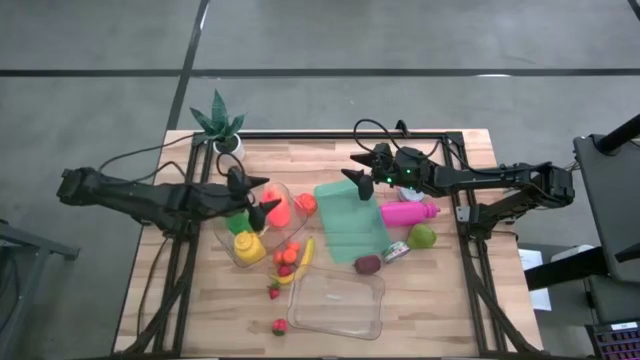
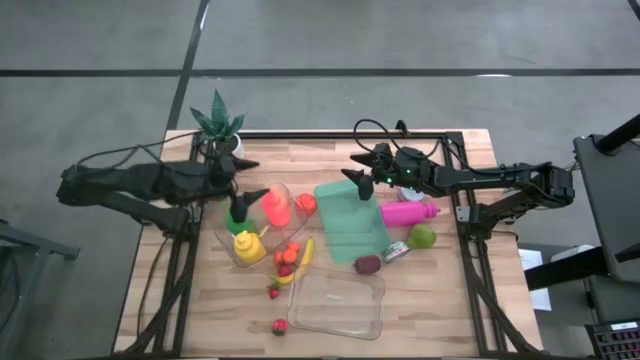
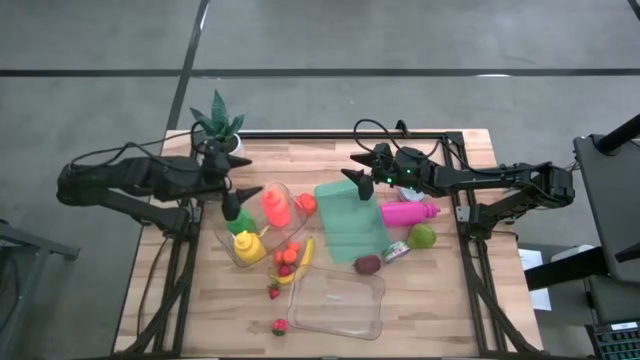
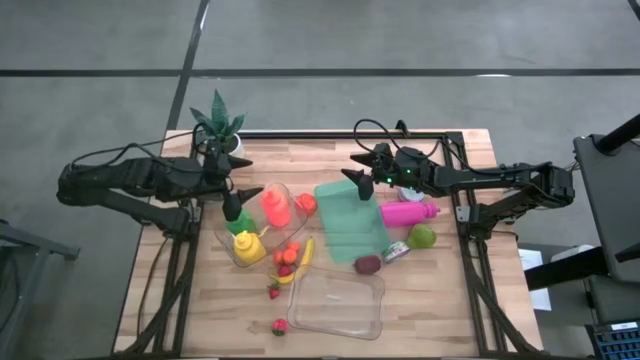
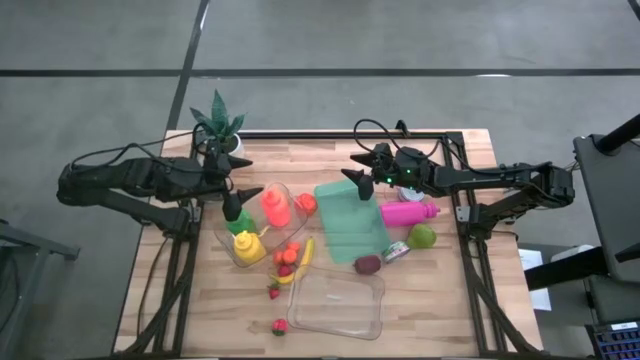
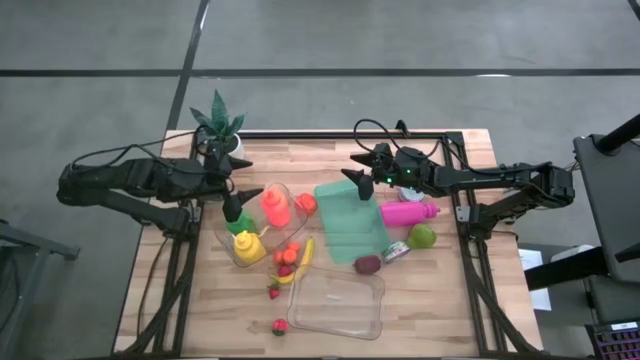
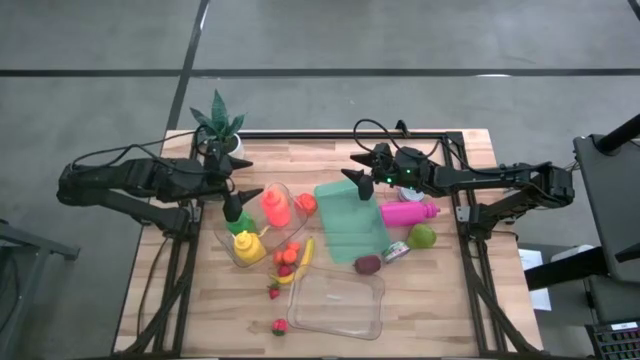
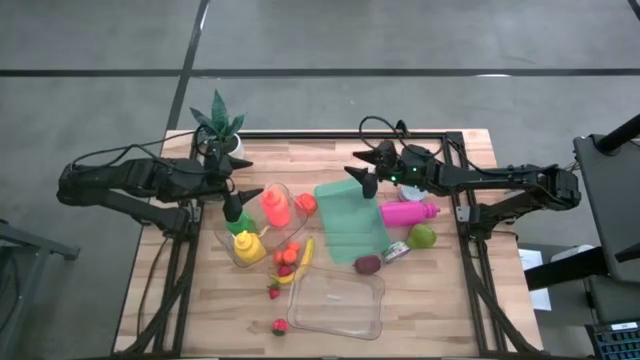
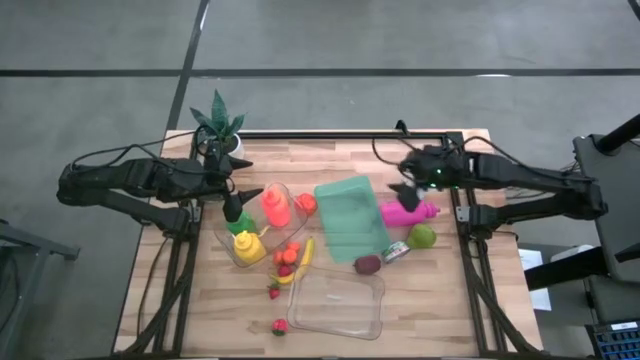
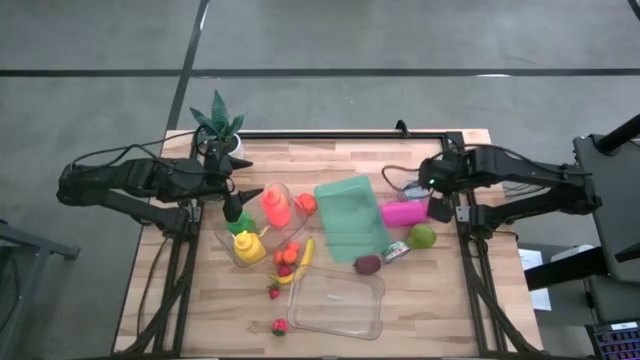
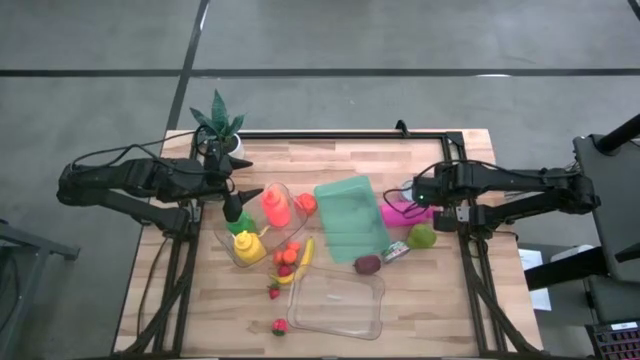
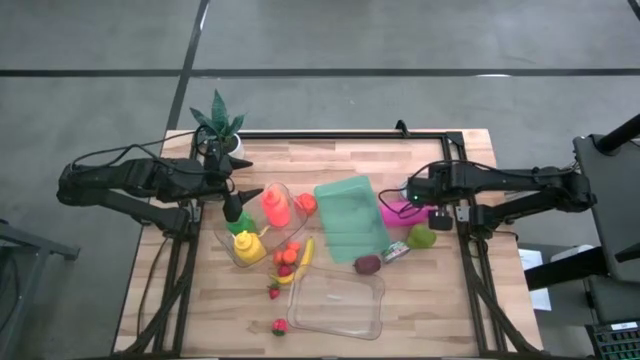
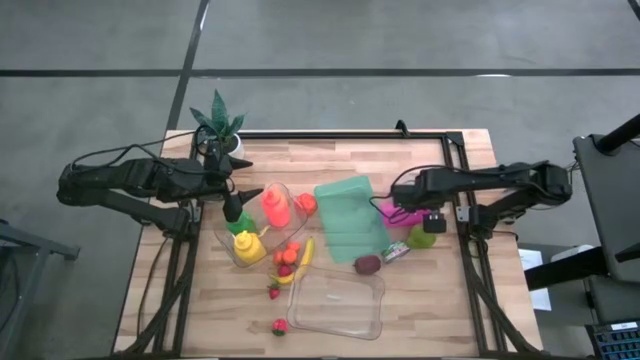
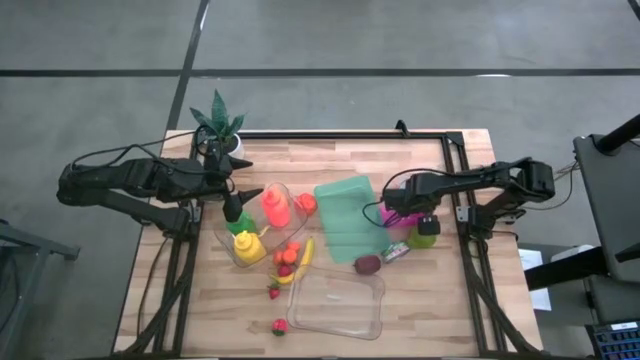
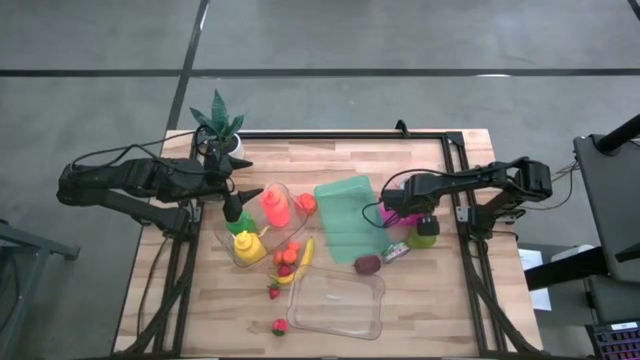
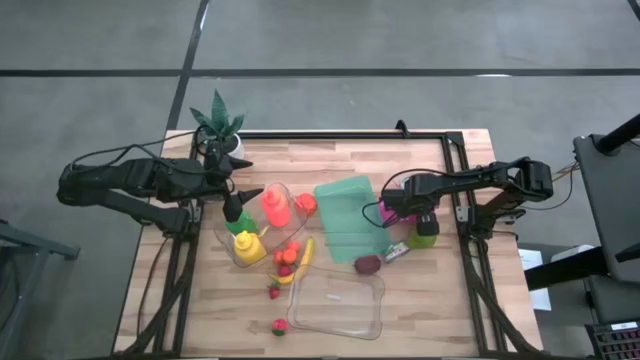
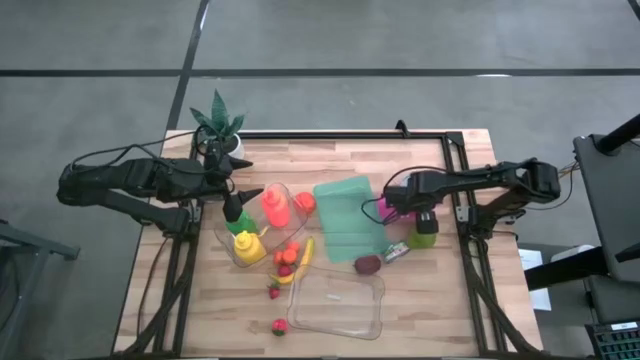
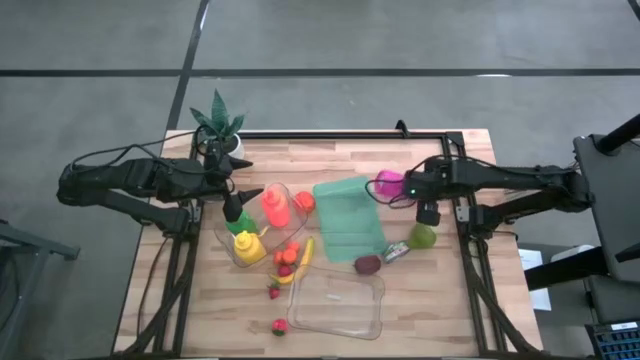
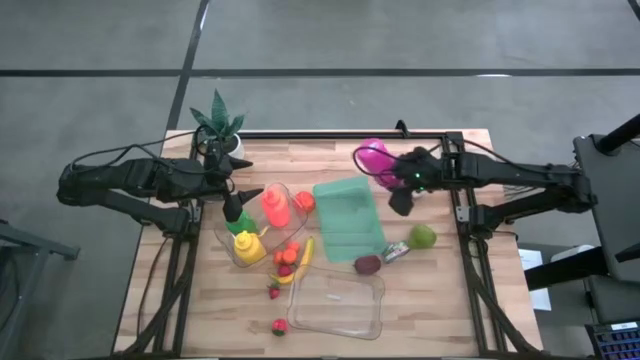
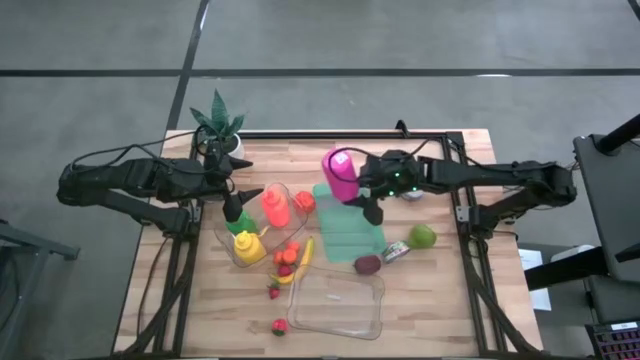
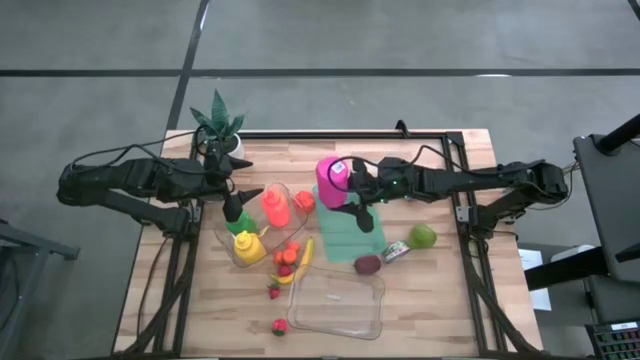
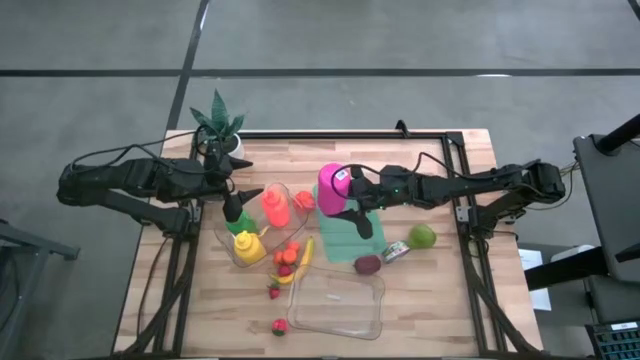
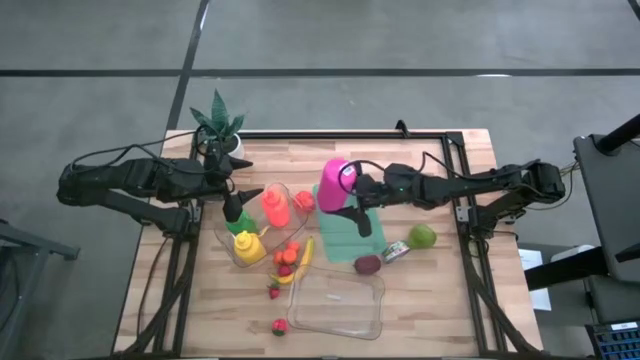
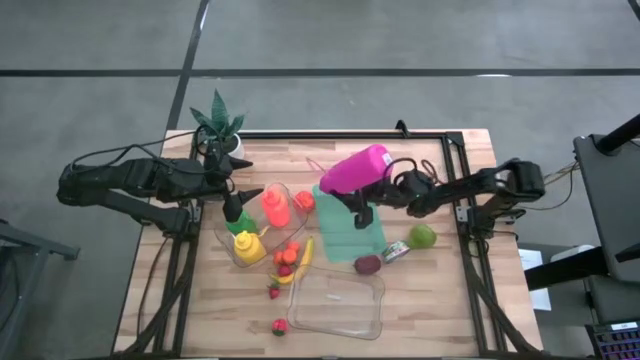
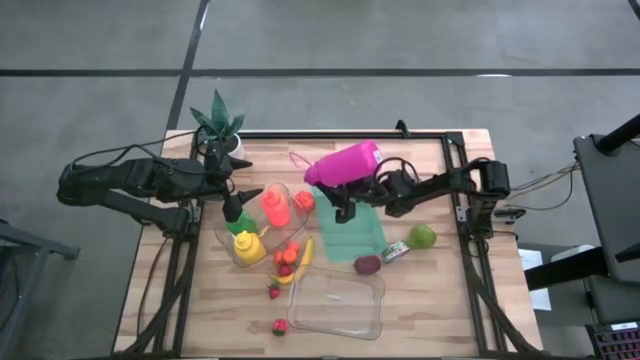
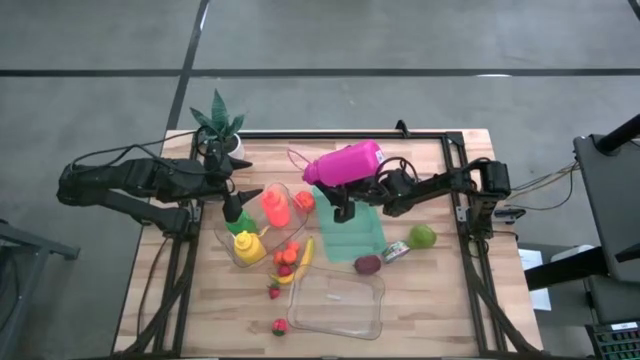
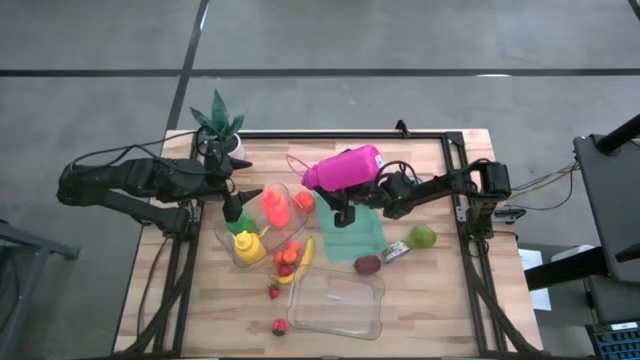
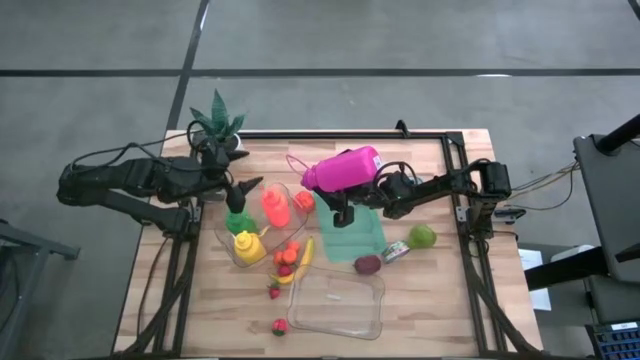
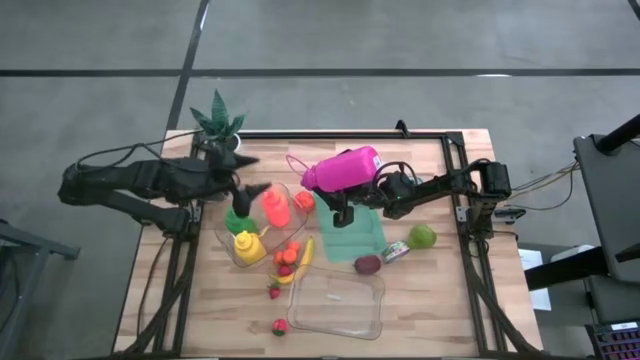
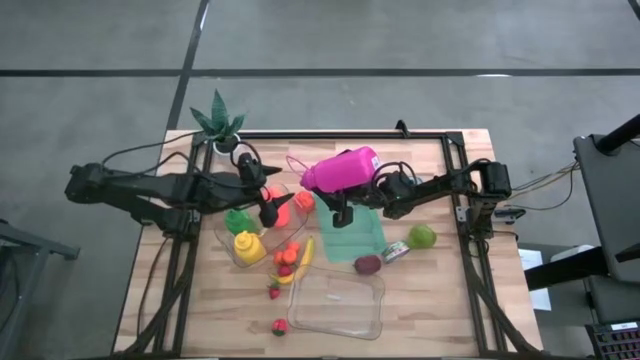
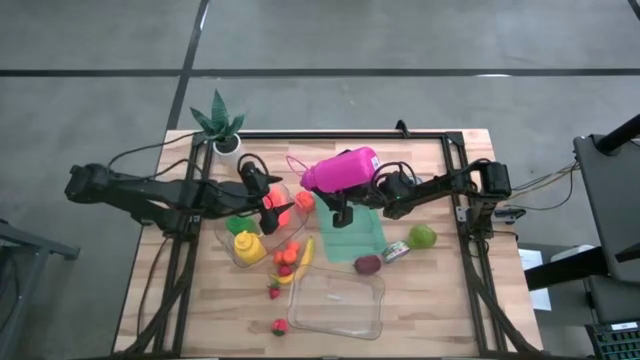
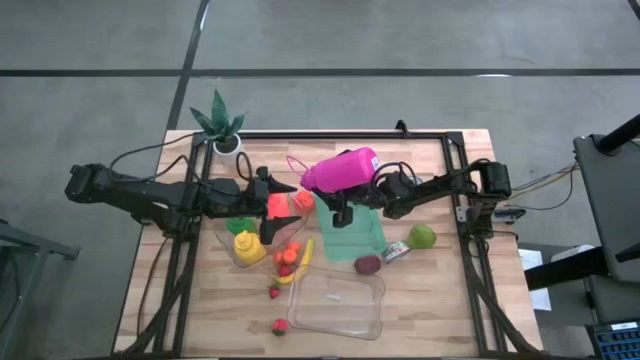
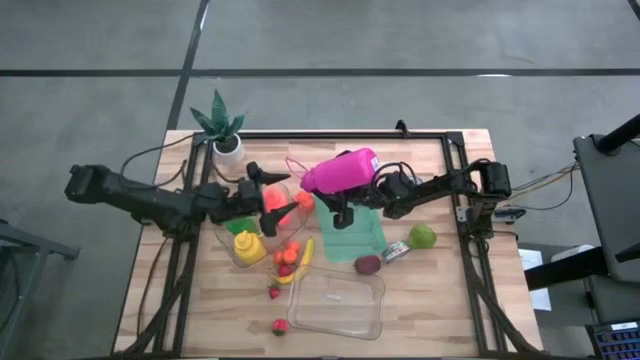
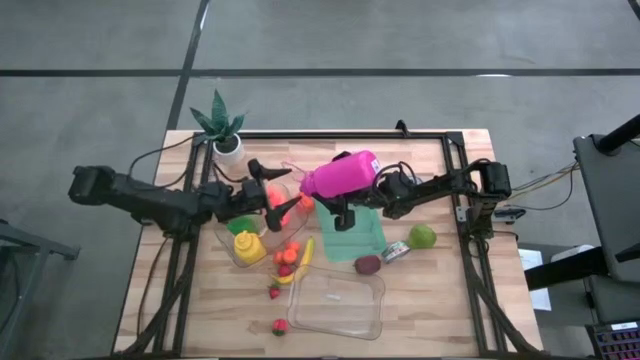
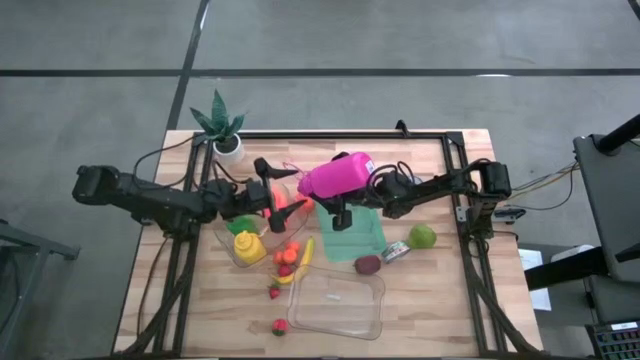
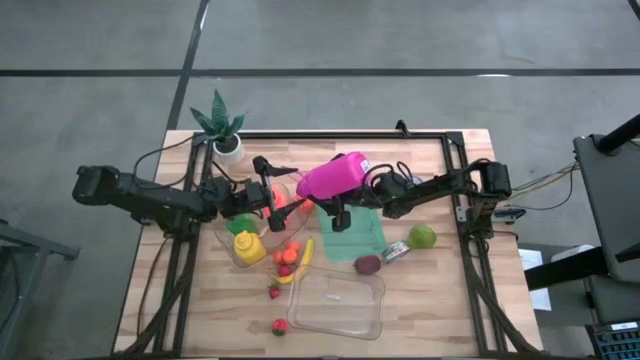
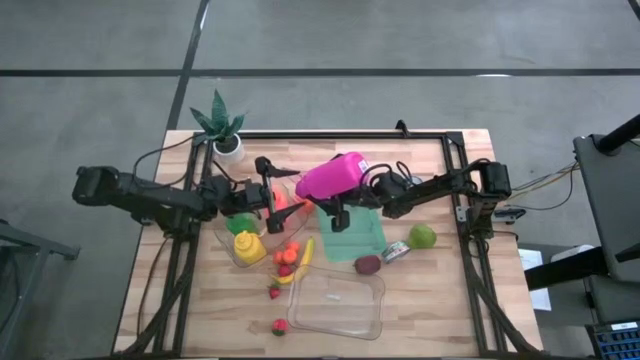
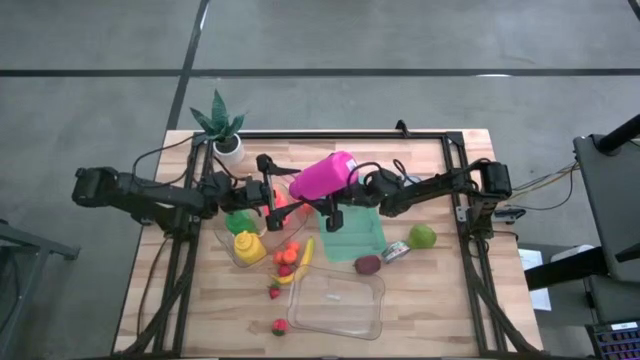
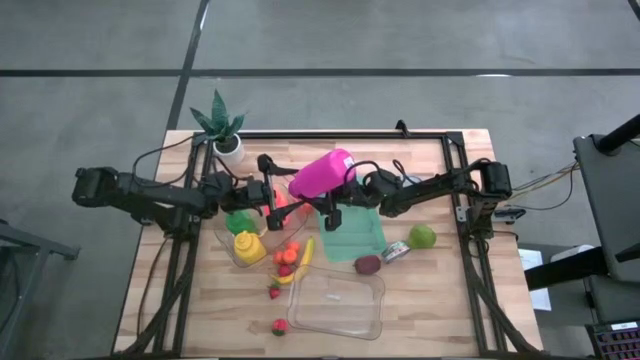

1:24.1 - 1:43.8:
Task: Pick & Place Food Item
Put the purple water bottle into the top transparent bin

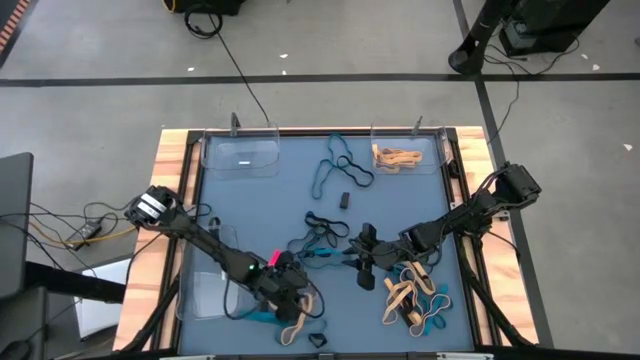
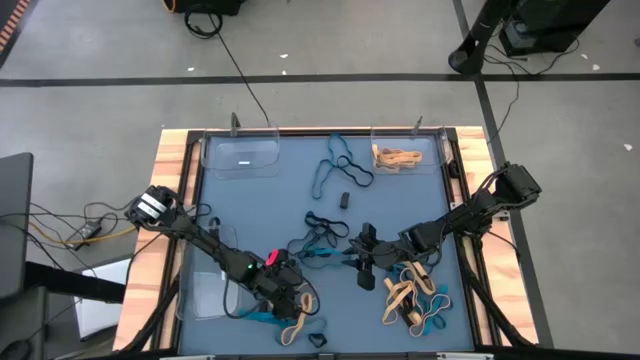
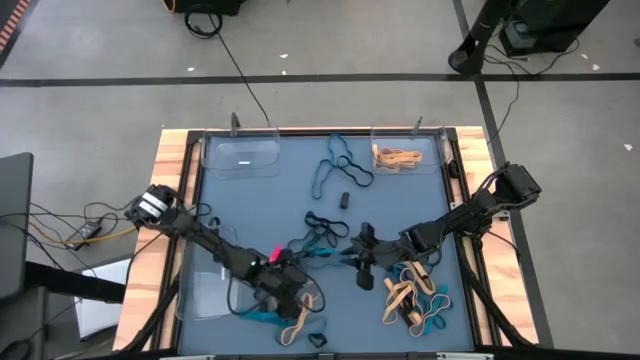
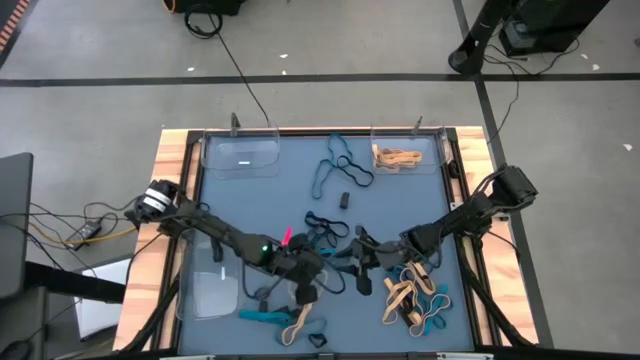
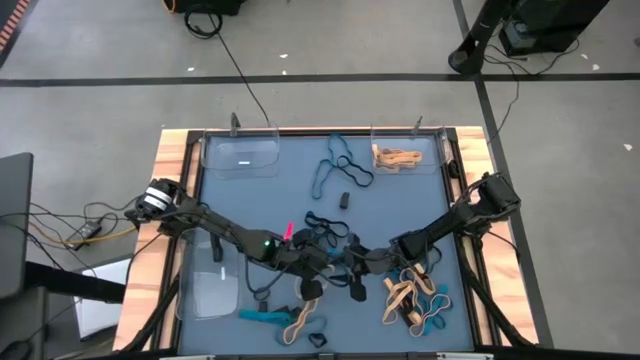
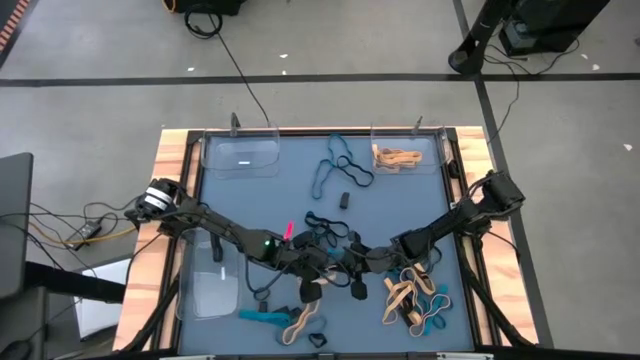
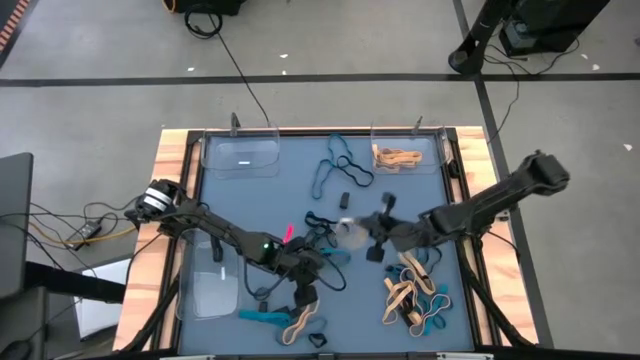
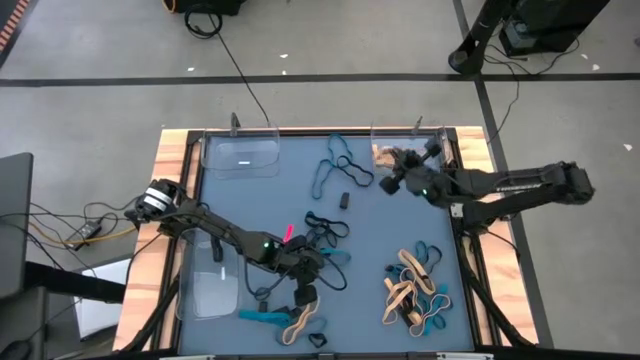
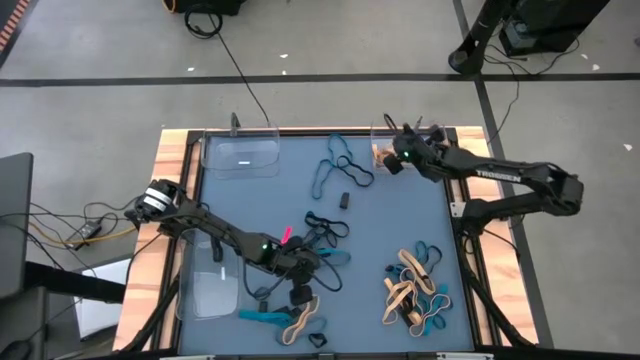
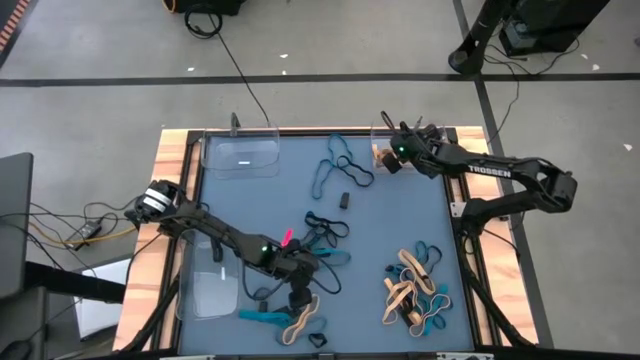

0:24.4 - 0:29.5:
Task: Sort rubber bands into baskets
Put the yellow rubber band into the top right transparent bin
